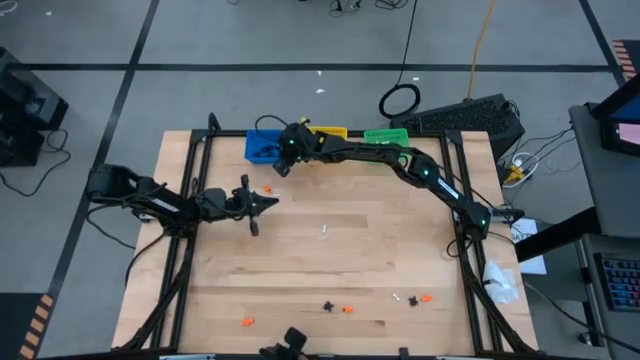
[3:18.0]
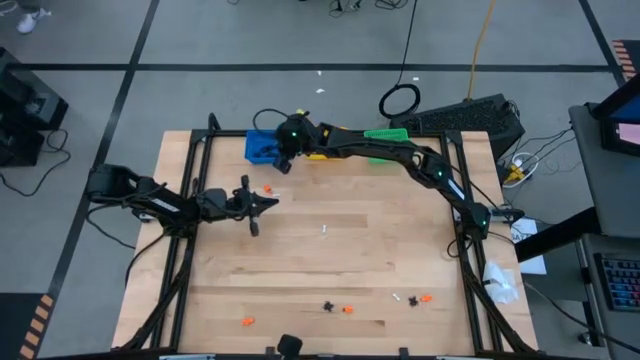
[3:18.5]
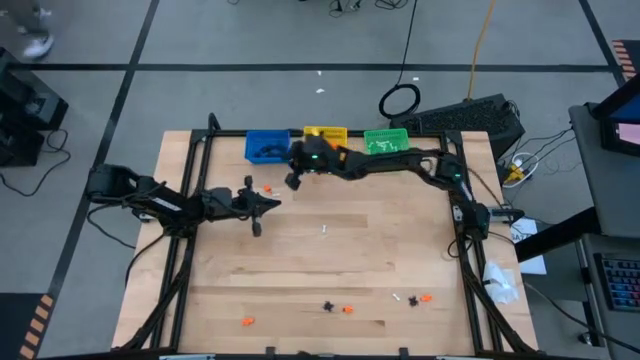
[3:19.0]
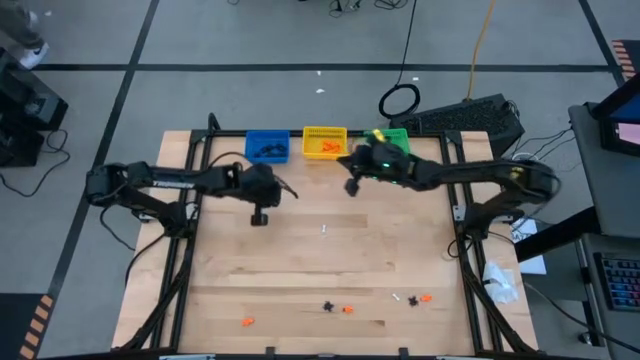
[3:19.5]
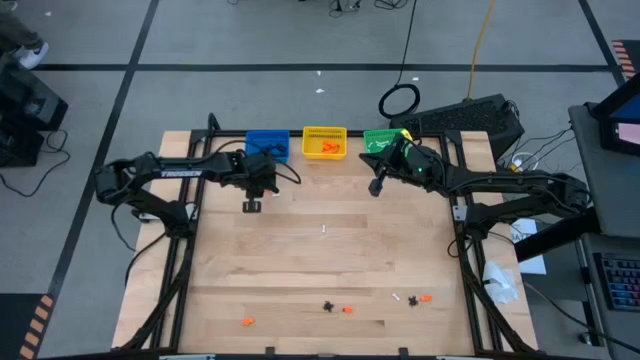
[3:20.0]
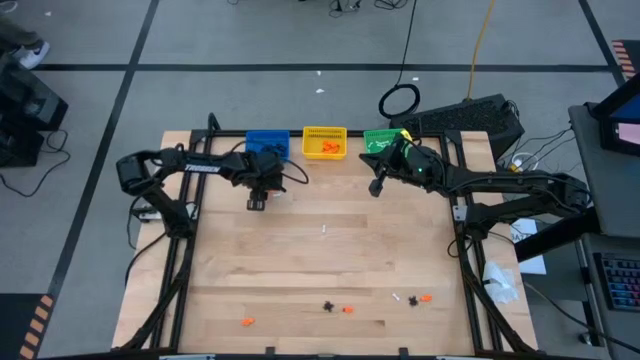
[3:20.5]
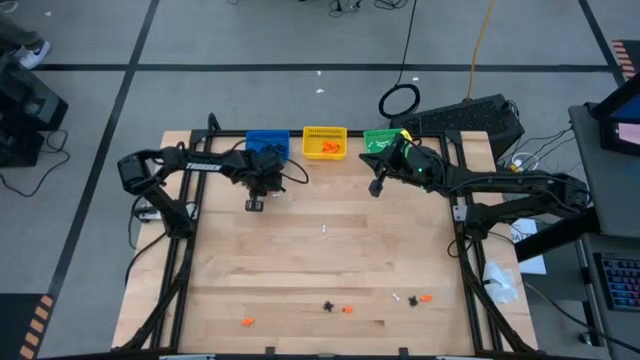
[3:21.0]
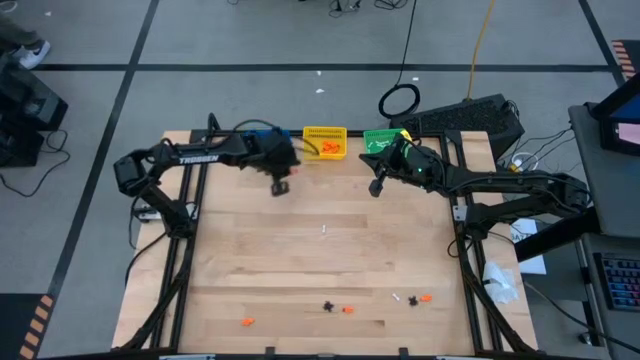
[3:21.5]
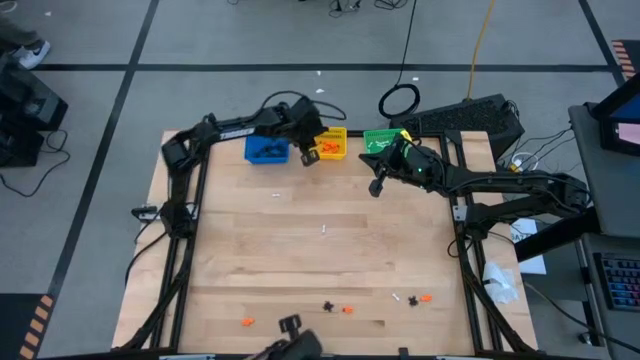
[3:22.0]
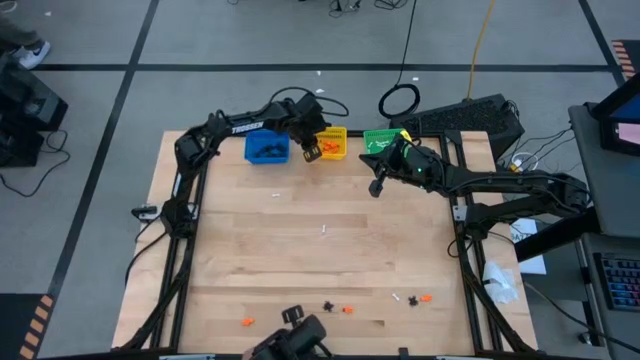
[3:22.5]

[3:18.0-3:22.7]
Task: Sort Halloween decoration
Put the orange skeleton toy into the yellow bin

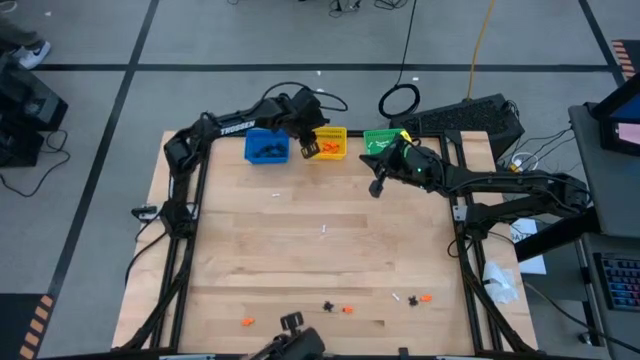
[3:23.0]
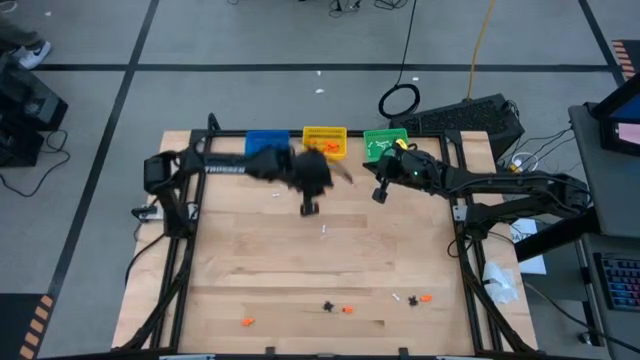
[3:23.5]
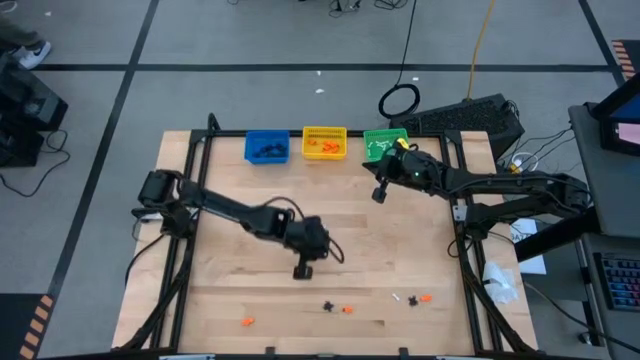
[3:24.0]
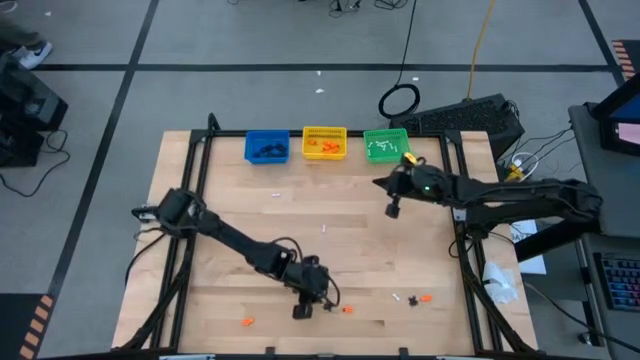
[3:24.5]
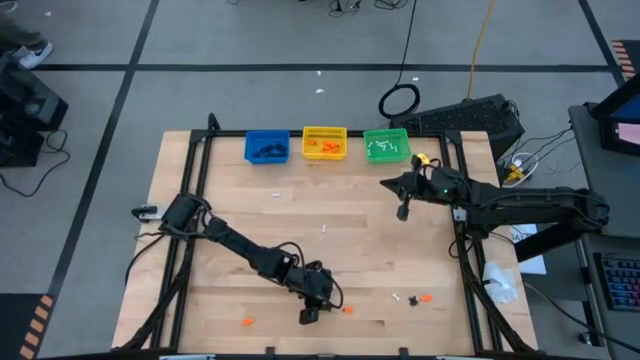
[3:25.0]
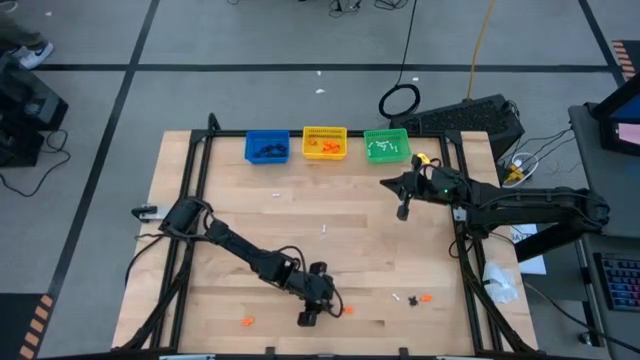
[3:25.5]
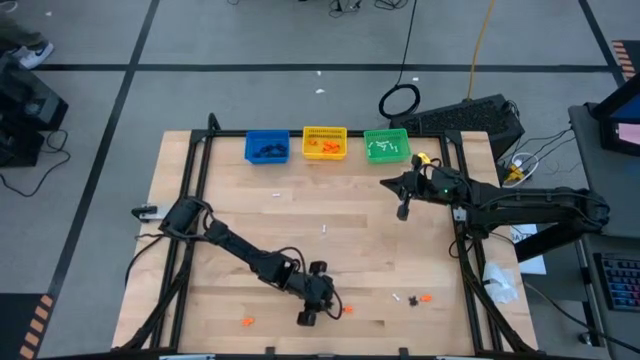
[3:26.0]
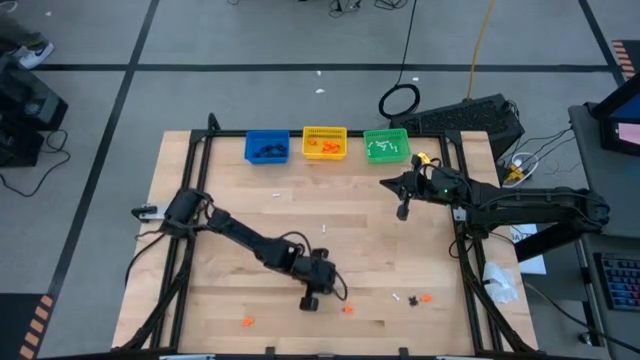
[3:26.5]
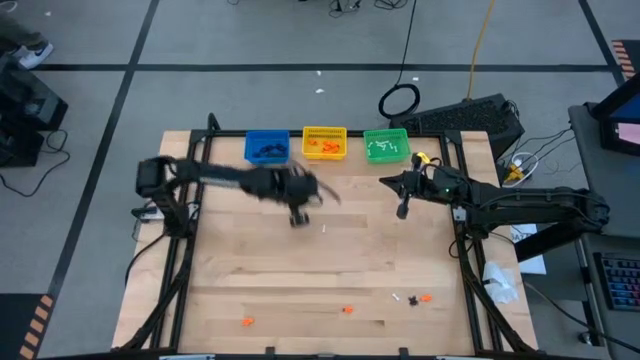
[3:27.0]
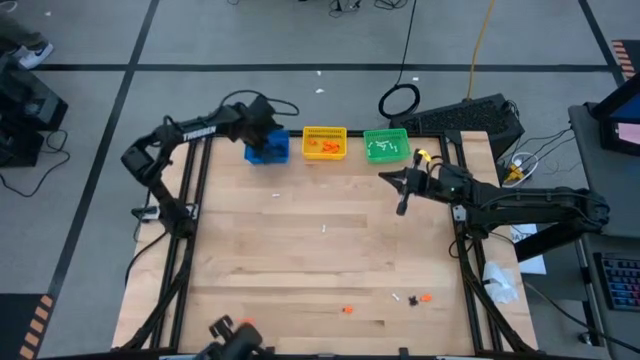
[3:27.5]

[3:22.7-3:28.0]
Put the black spider toy into the blue bin

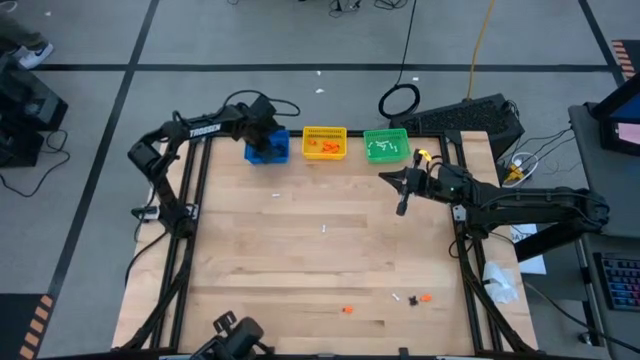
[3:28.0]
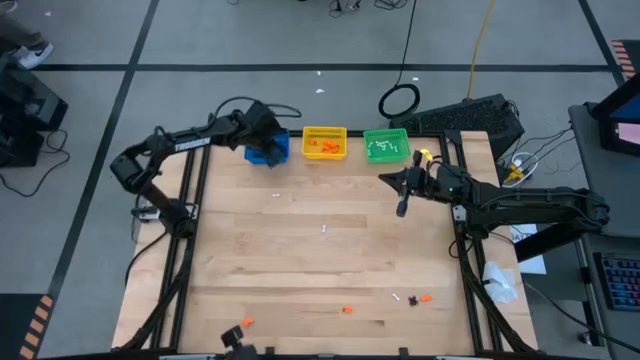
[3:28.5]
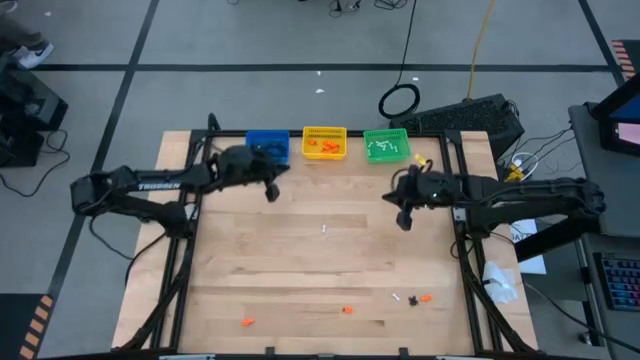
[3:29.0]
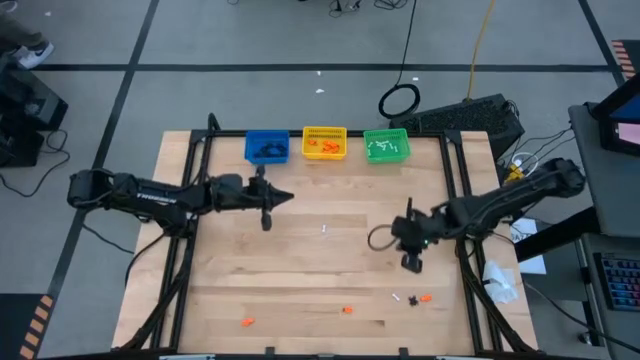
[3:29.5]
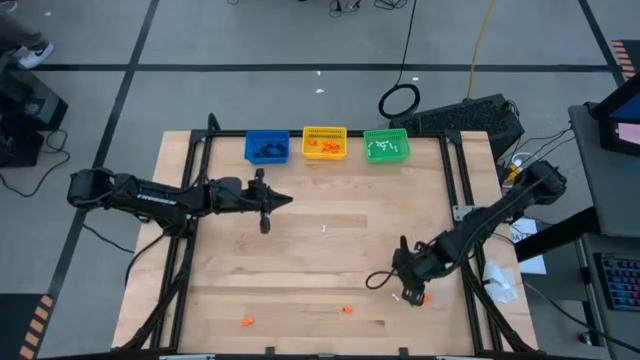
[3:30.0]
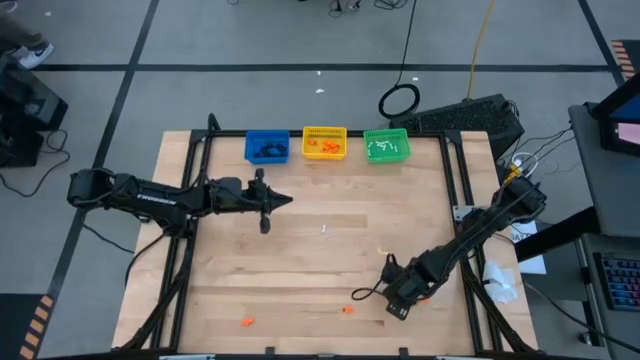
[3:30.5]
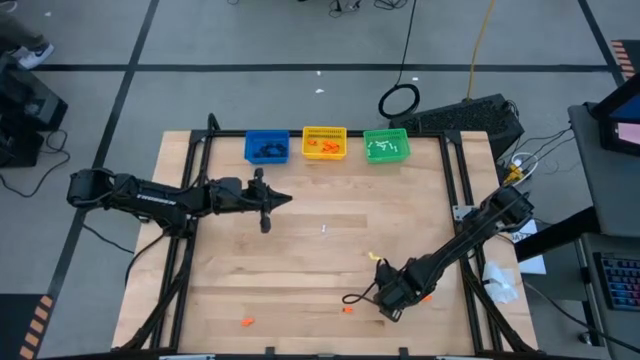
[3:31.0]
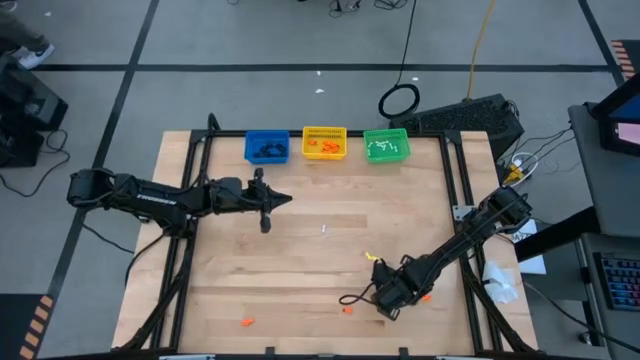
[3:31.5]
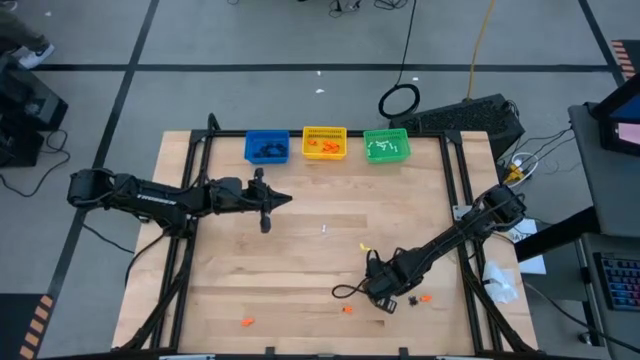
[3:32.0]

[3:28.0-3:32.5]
Put the white bone toy into the green bin

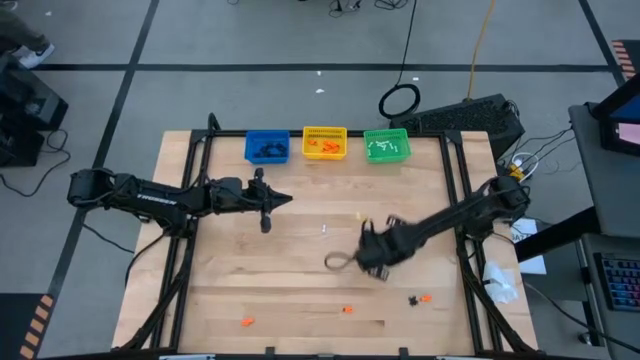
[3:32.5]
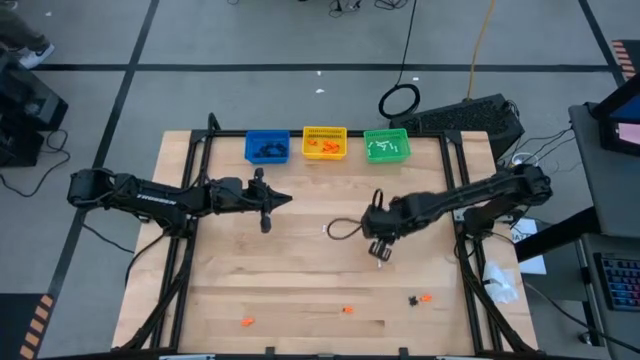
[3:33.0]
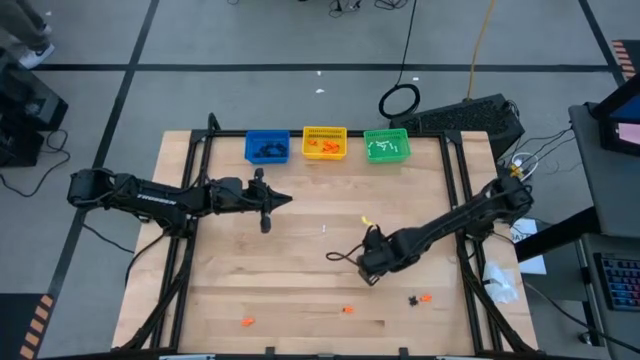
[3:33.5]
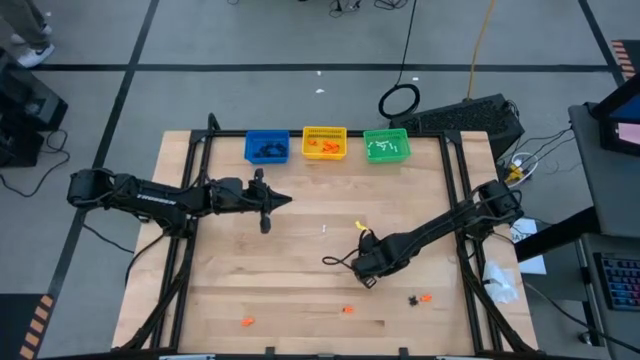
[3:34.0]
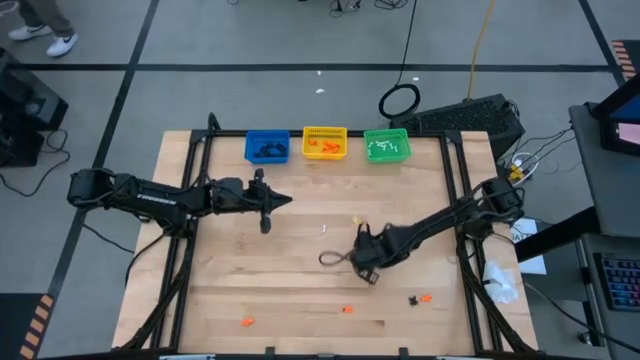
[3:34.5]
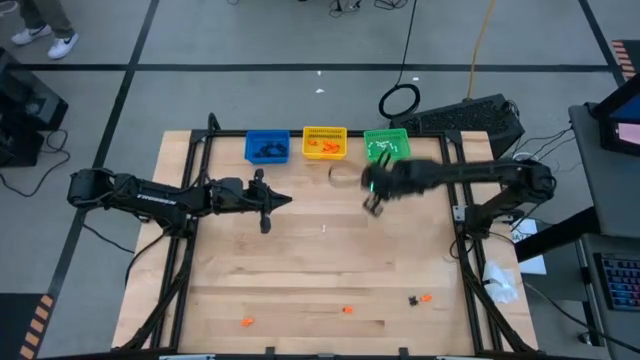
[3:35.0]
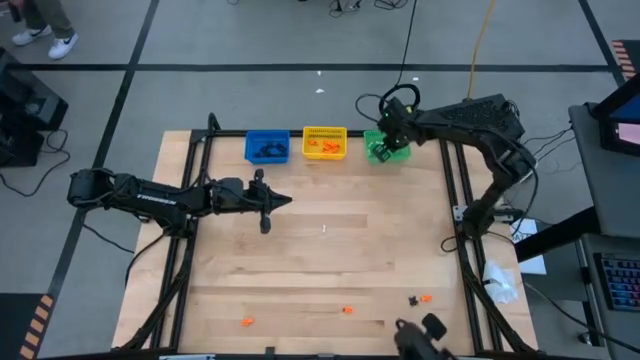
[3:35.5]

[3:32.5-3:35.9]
Put the white bone toy into the green bin

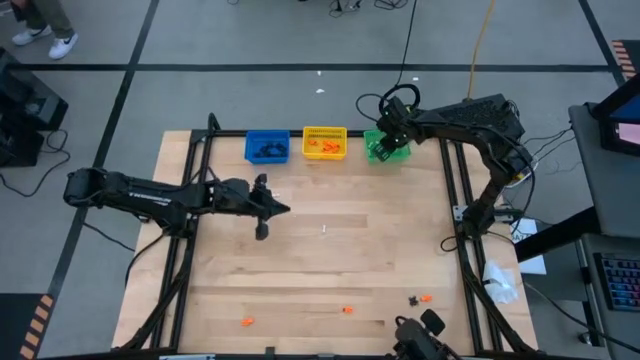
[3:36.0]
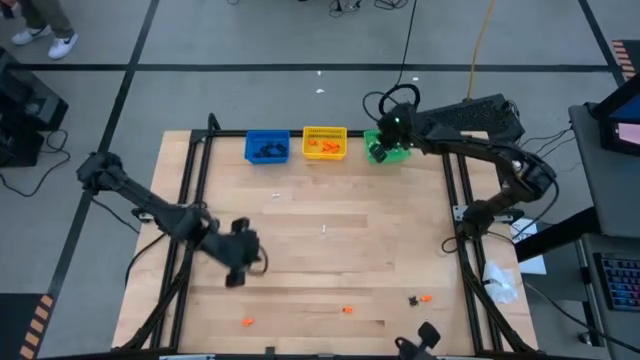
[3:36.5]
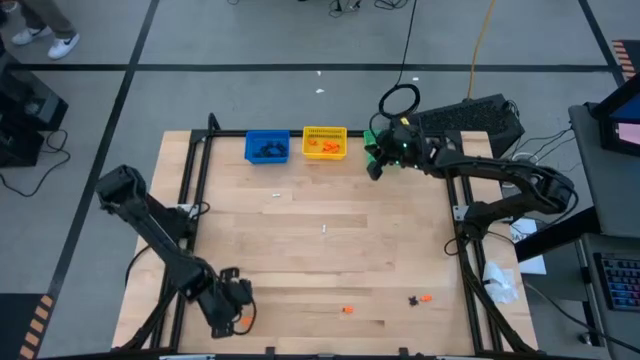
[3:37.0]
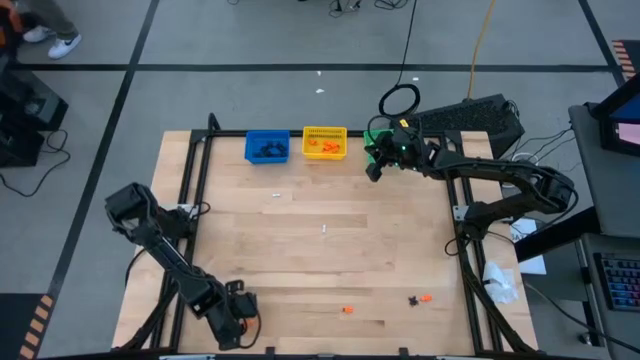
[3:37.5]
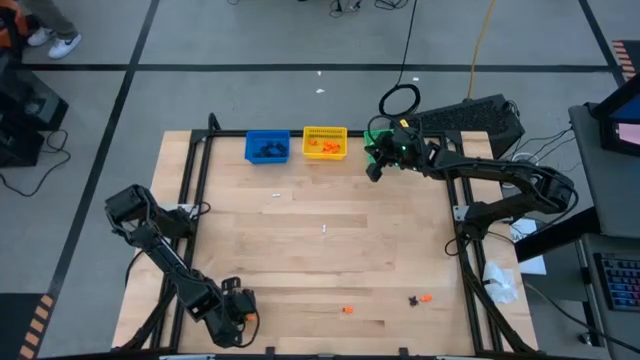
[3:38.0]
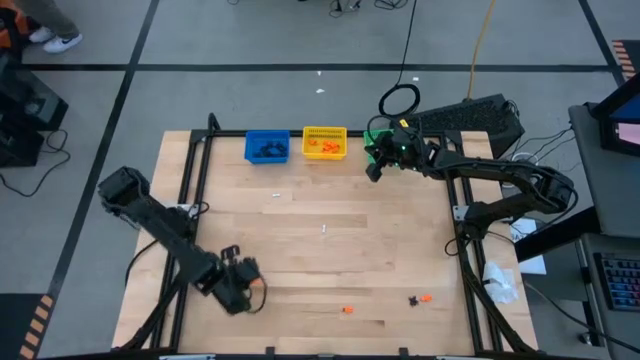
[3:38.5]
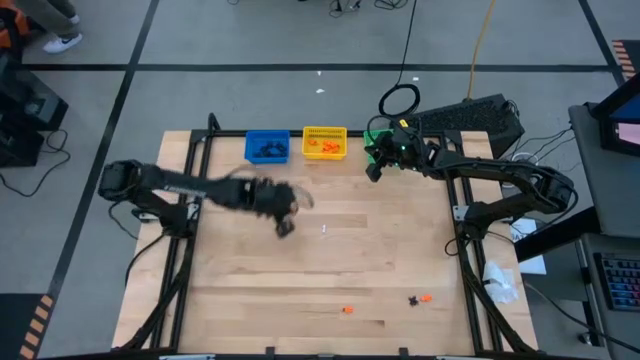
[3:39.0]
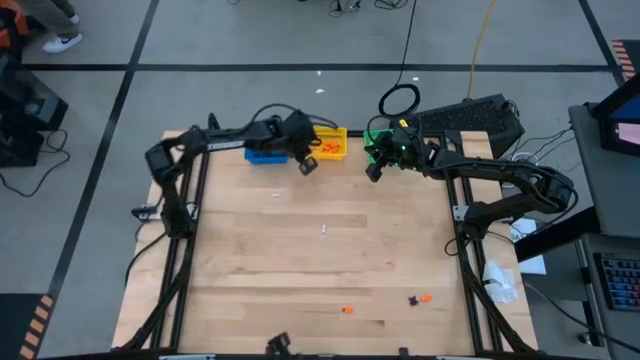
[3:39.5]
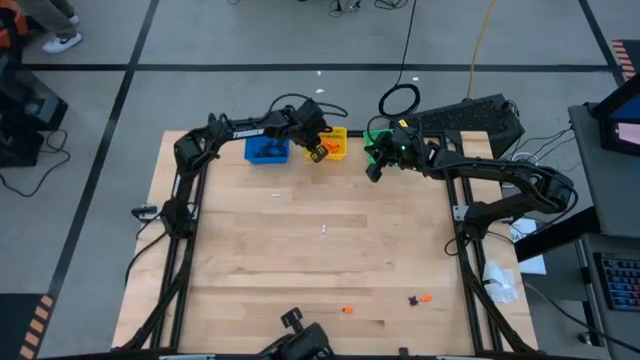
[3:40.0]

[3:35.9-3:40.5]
Put the orange skeleton toy into the yellow bin
